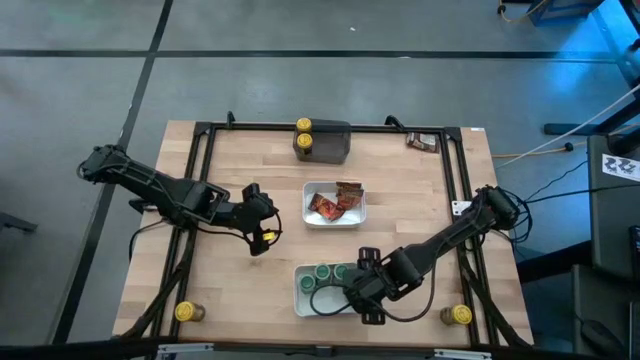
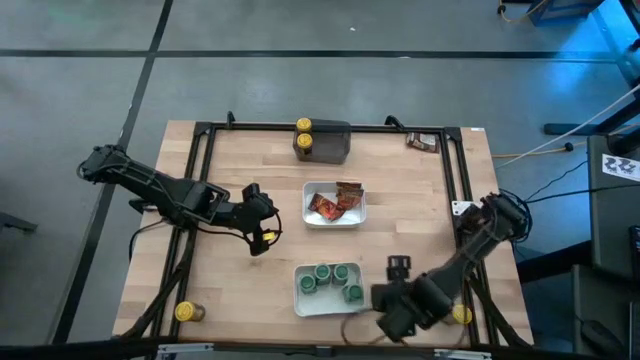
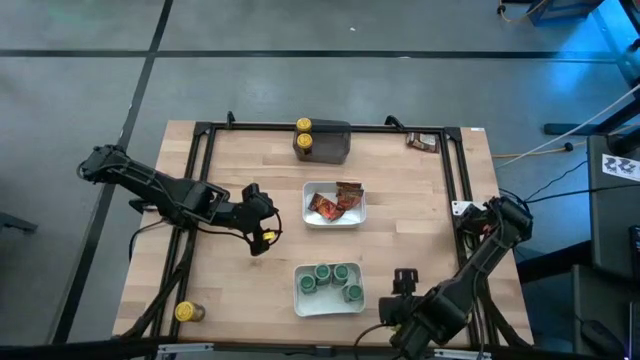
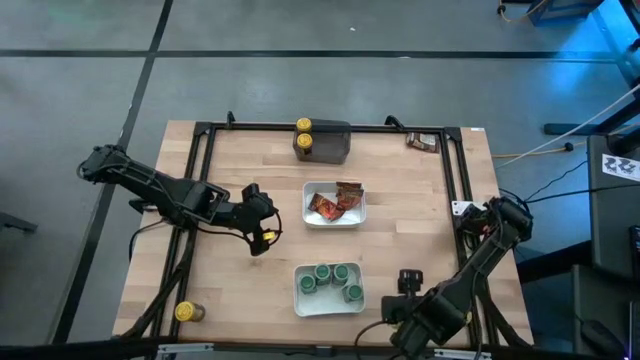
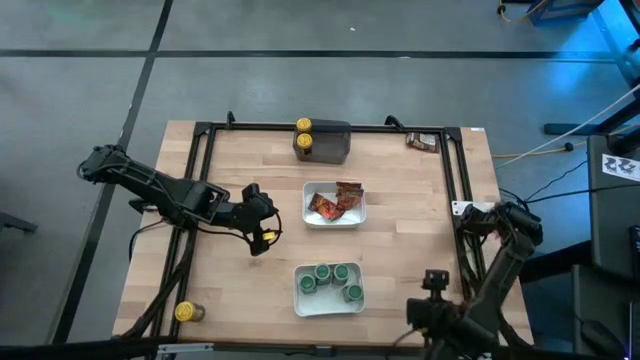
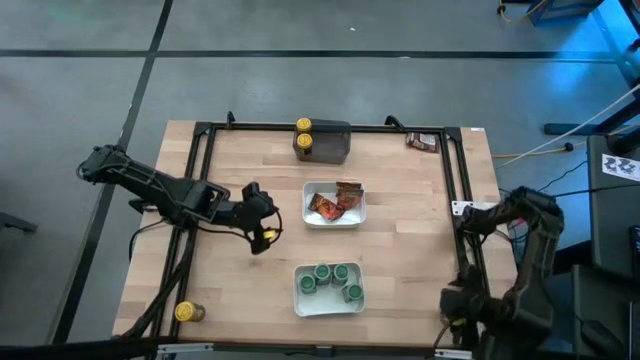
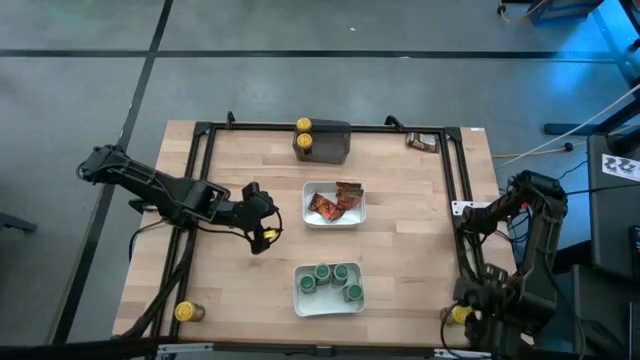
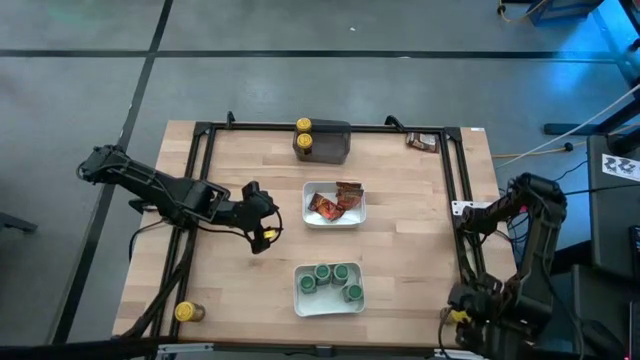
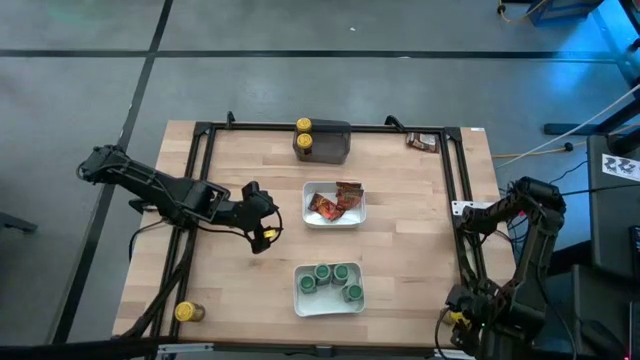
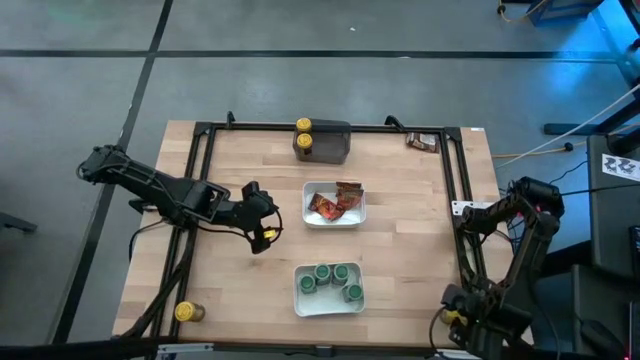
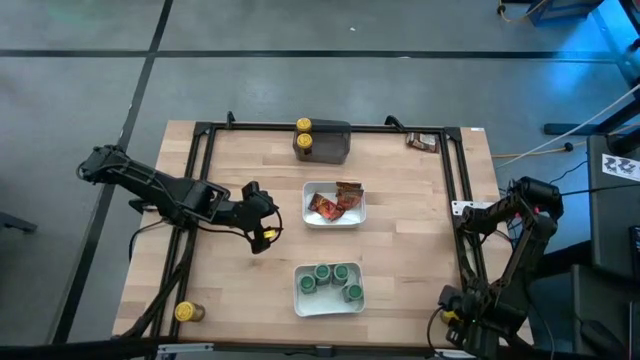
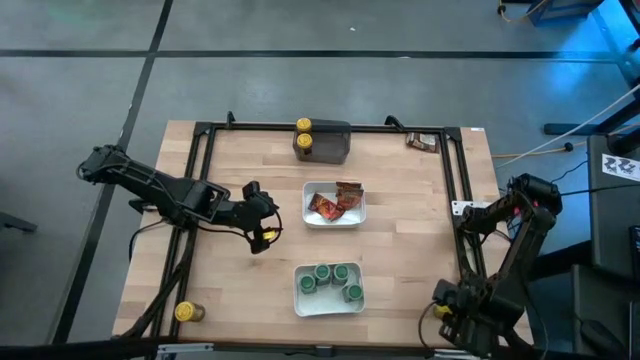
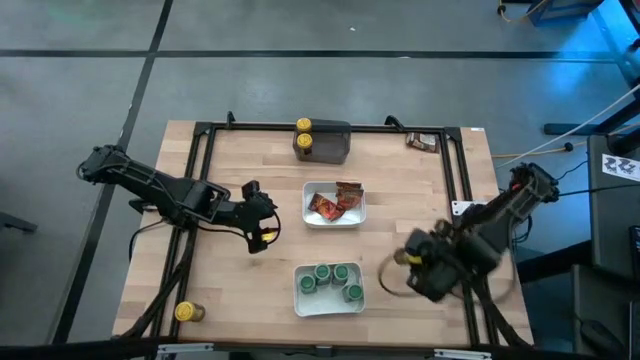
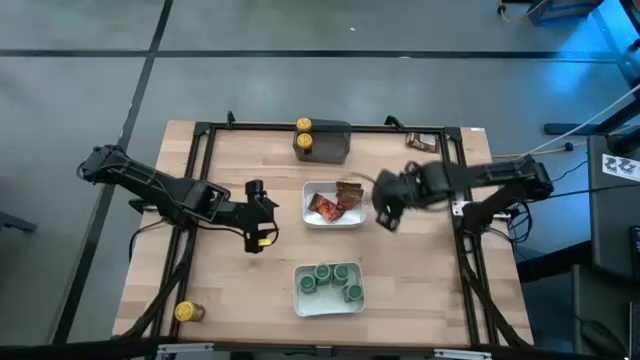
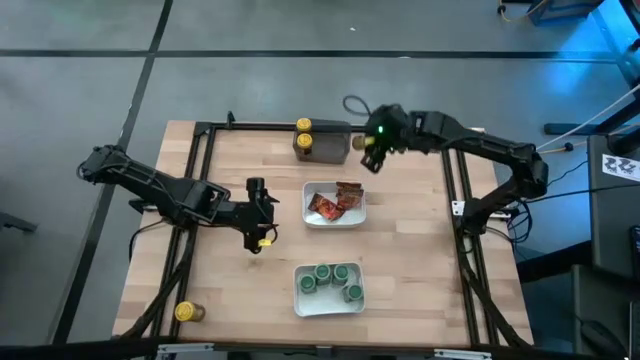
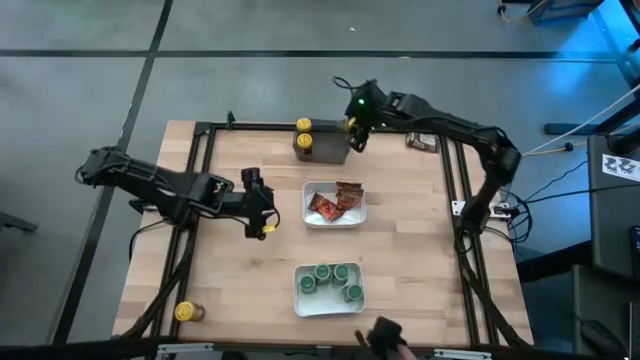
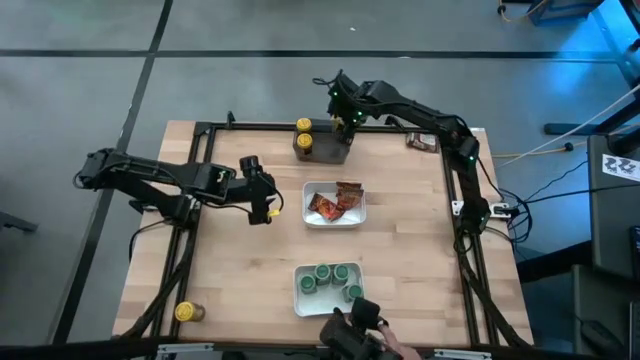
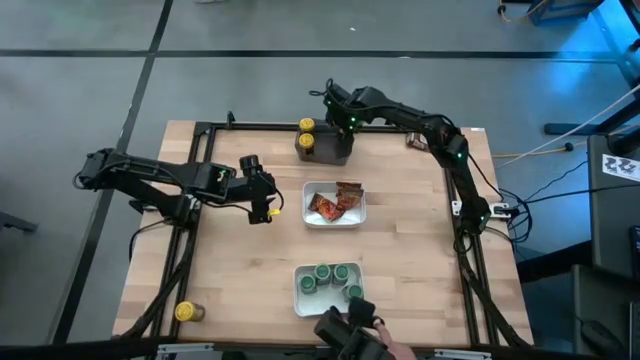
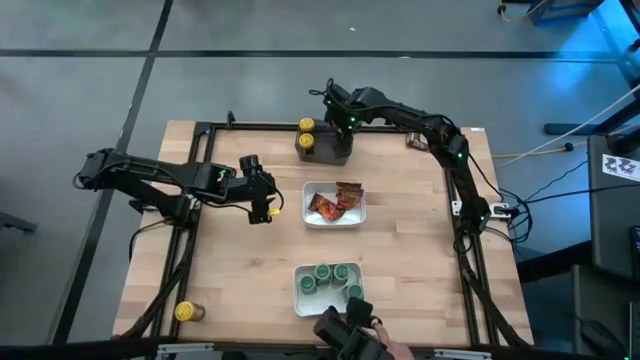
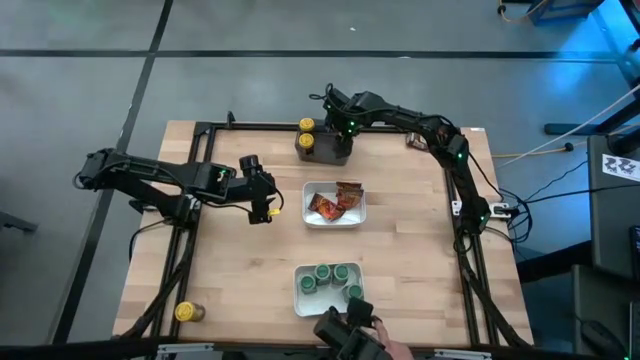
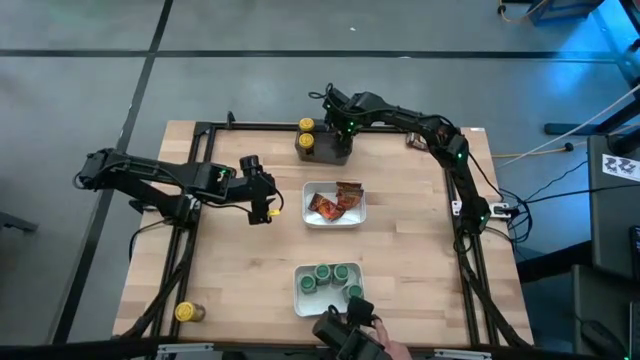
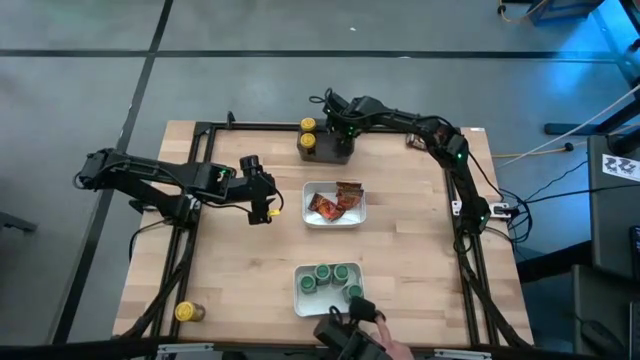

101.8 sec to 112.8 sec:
Task: Sort spices by type
Put the yellow seasoning bottle into the black bin

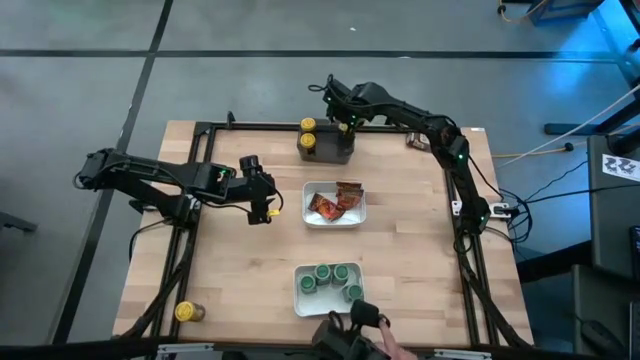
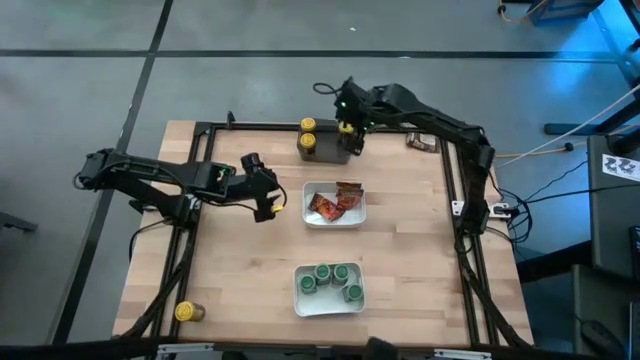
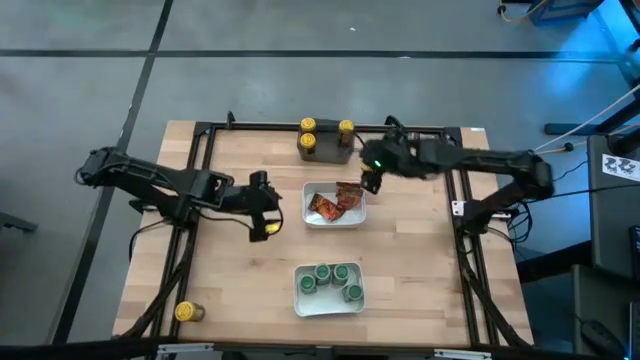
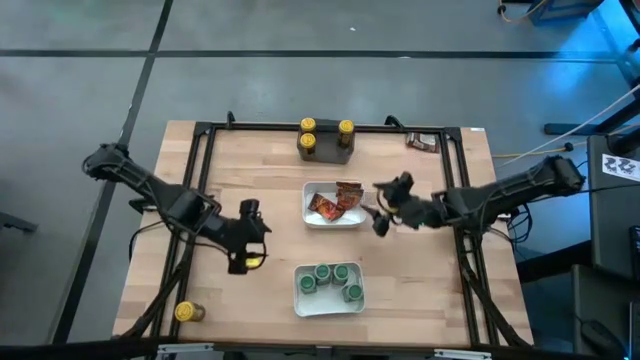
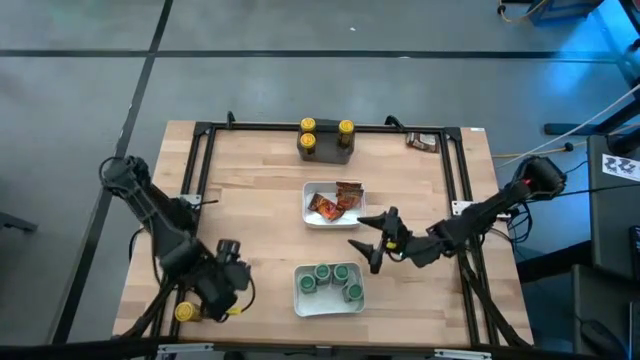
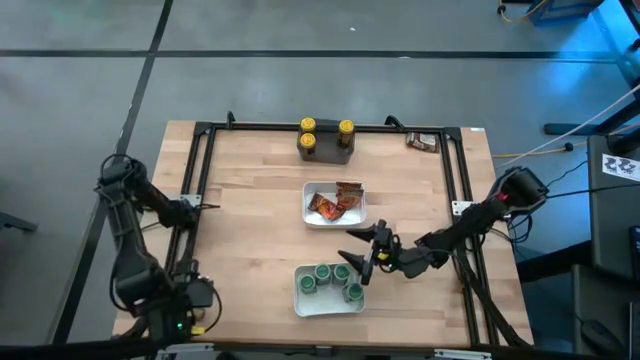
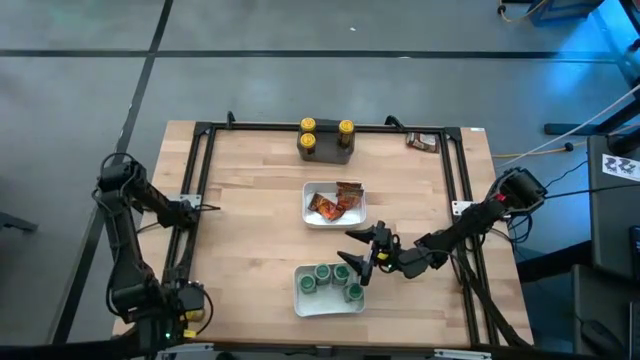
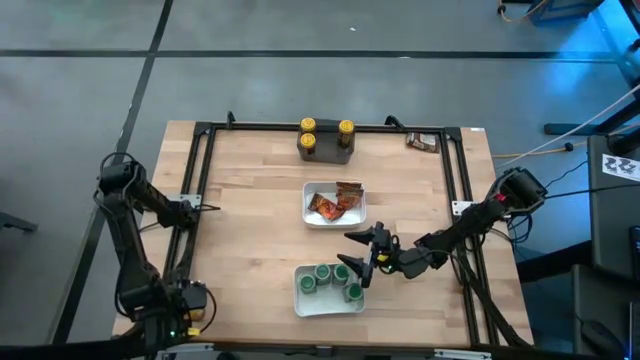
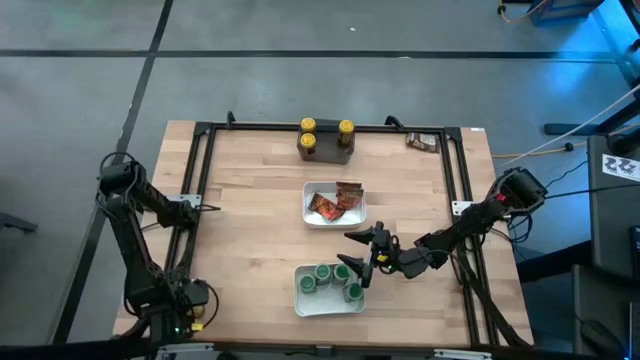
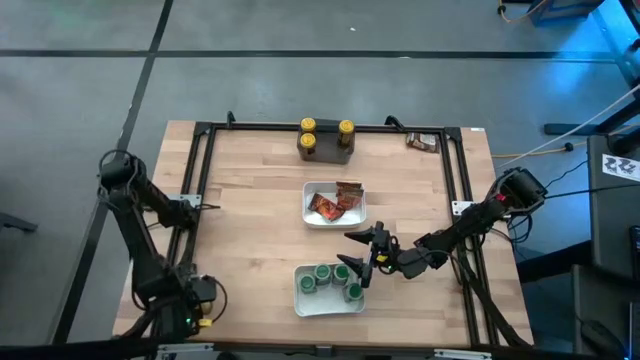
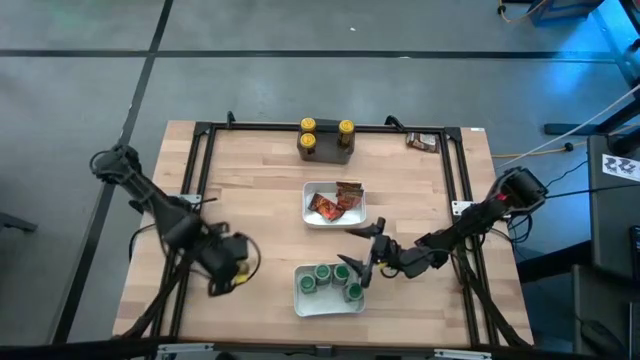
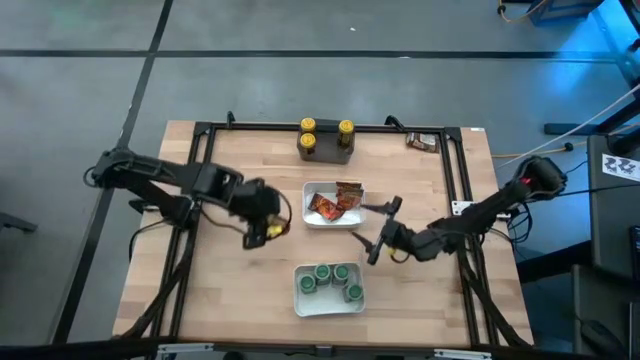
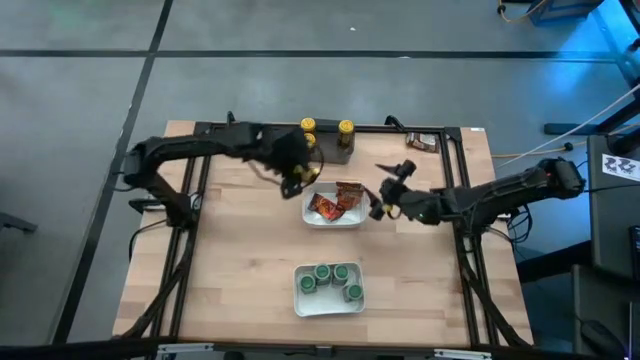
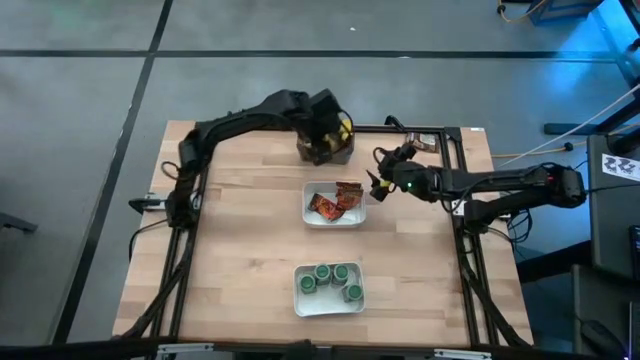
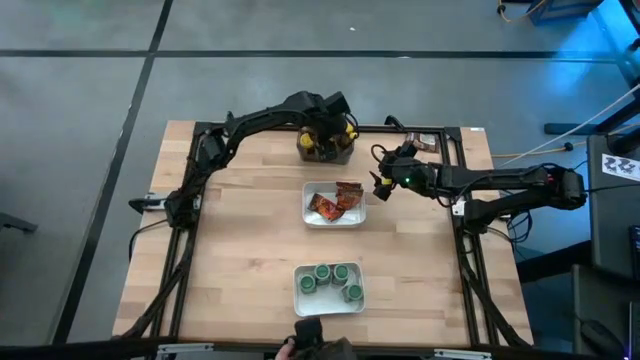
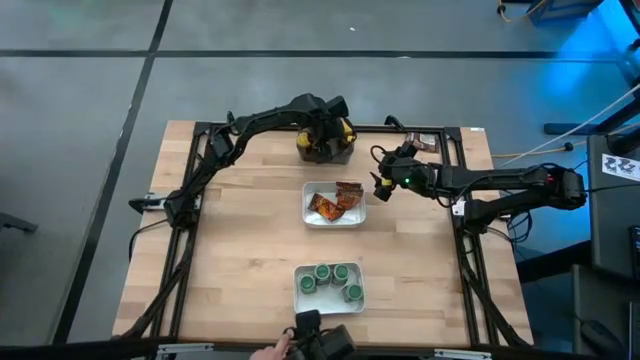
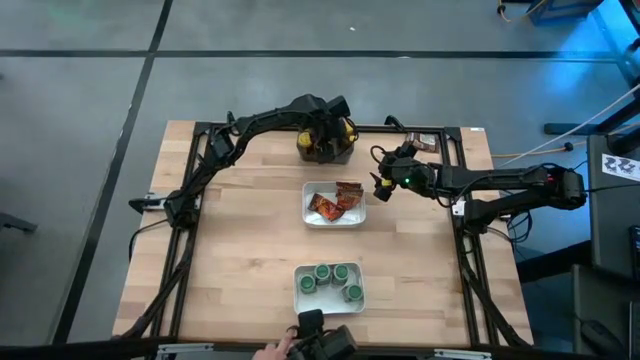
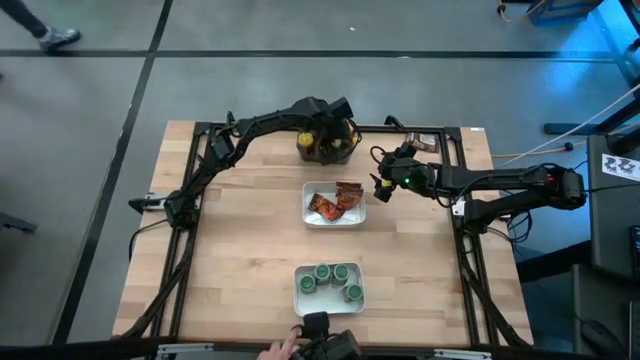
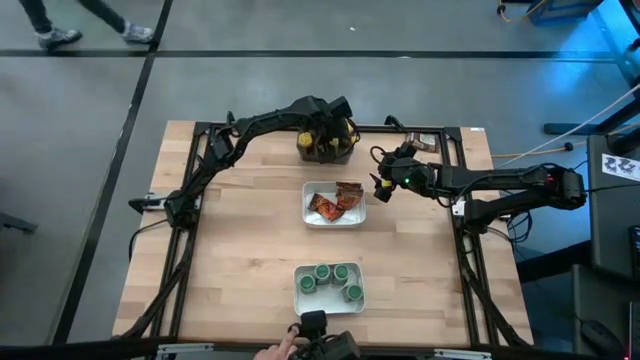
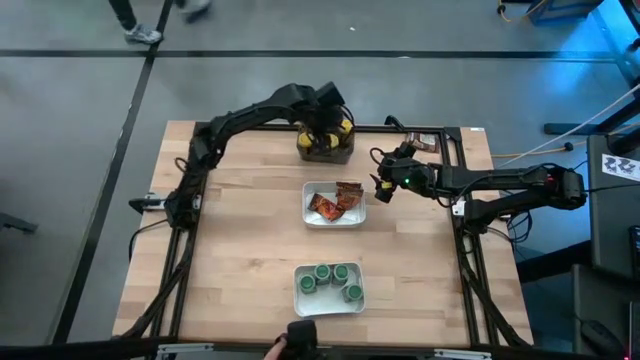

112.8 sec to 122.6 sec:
Put the yellow seasoning bottle into the black bin
